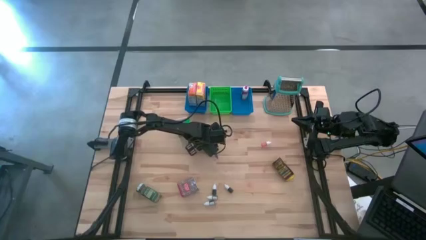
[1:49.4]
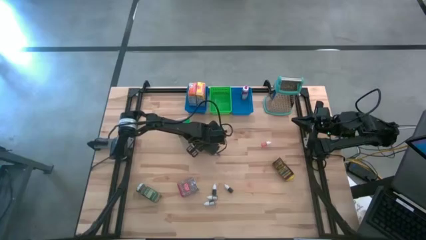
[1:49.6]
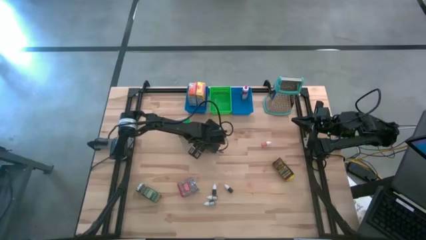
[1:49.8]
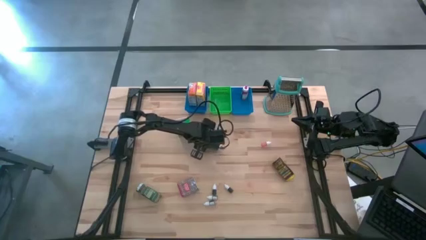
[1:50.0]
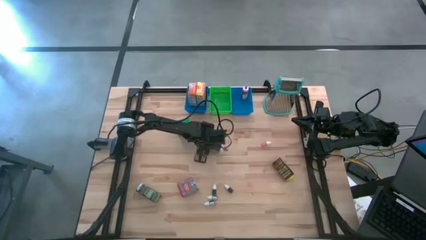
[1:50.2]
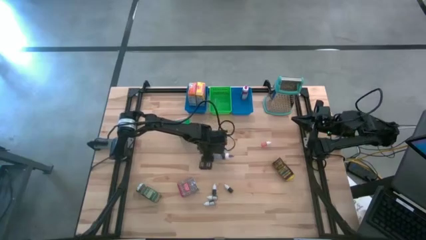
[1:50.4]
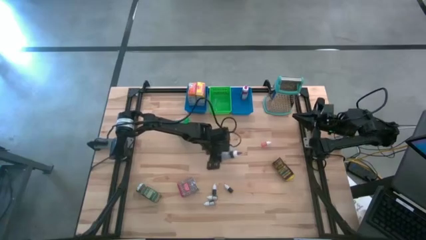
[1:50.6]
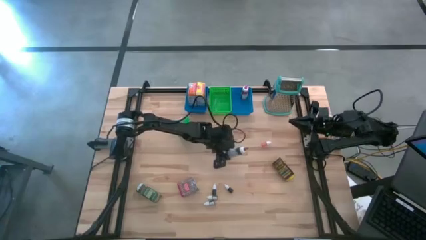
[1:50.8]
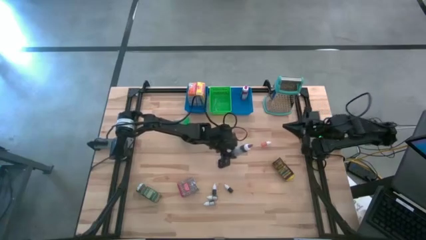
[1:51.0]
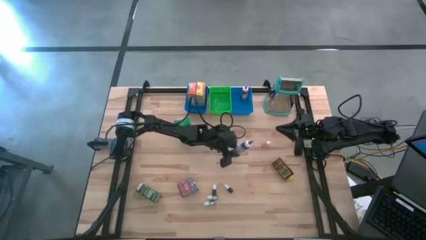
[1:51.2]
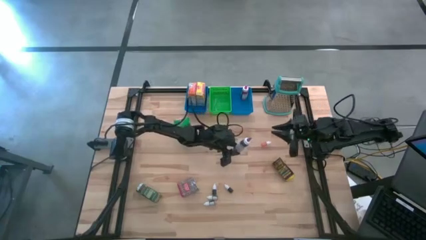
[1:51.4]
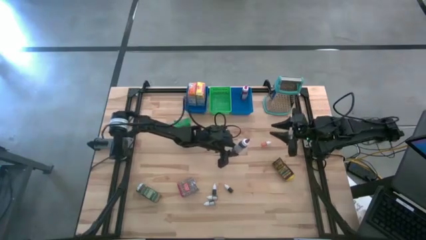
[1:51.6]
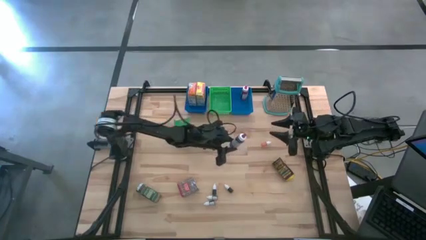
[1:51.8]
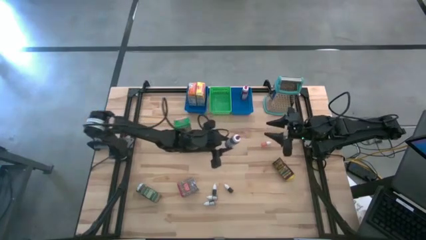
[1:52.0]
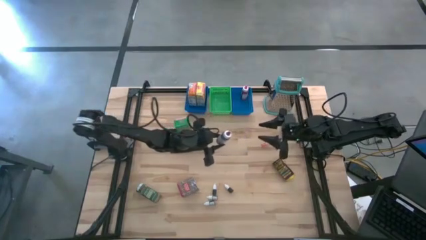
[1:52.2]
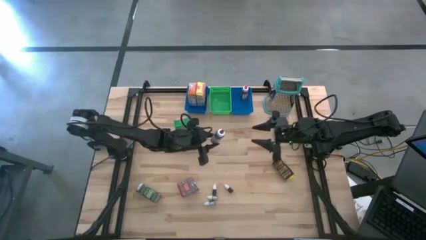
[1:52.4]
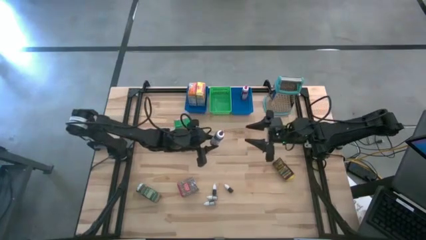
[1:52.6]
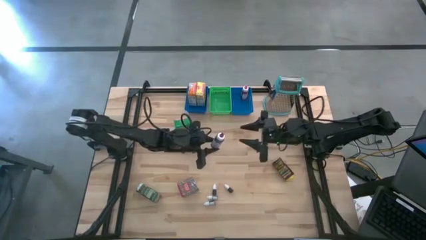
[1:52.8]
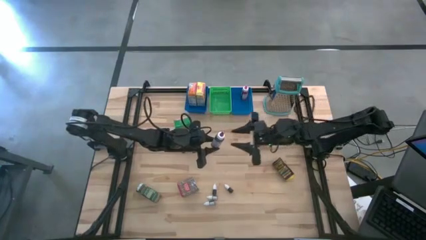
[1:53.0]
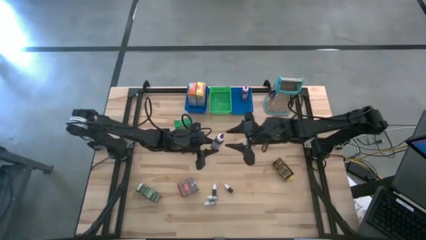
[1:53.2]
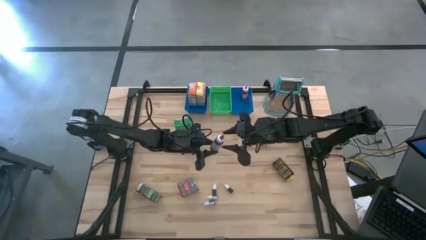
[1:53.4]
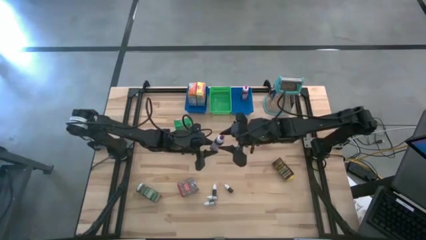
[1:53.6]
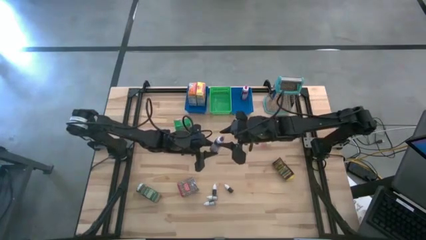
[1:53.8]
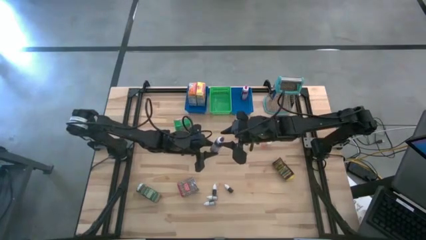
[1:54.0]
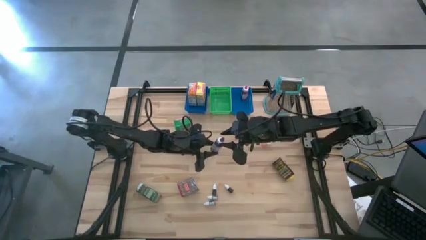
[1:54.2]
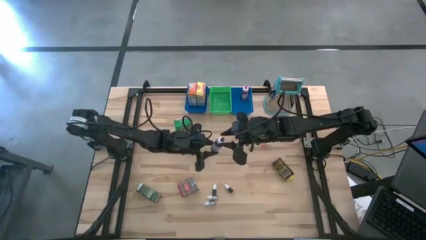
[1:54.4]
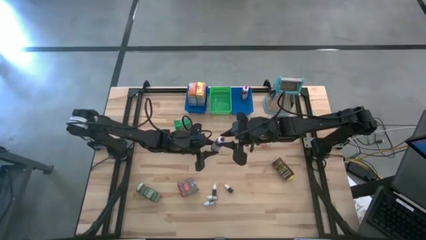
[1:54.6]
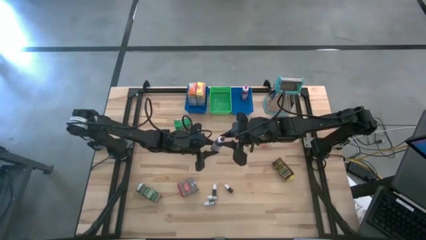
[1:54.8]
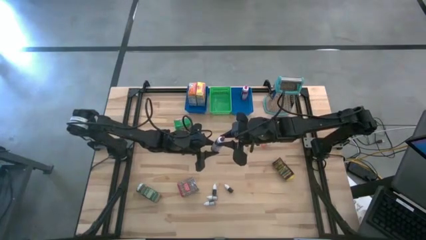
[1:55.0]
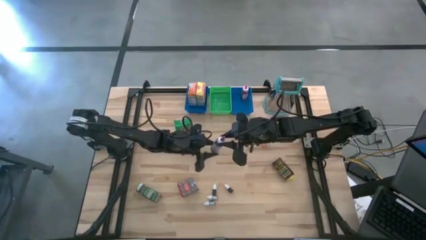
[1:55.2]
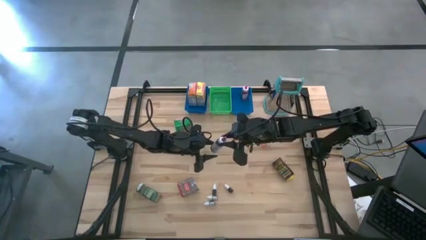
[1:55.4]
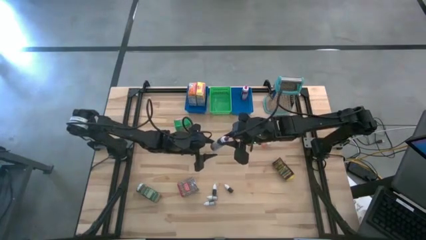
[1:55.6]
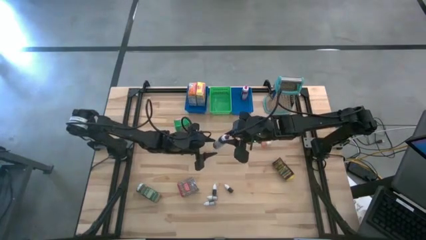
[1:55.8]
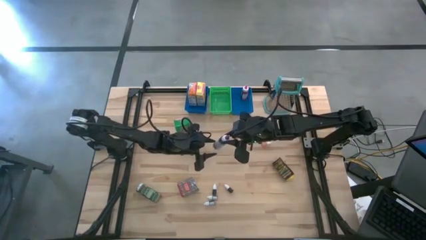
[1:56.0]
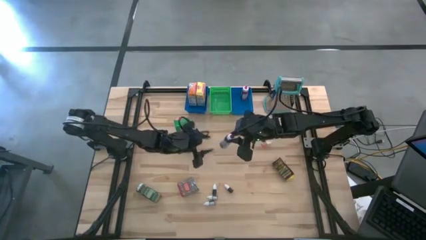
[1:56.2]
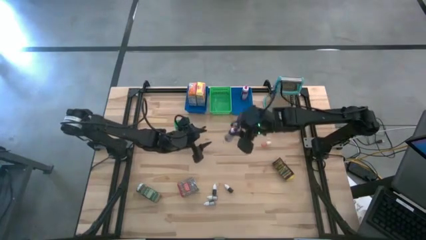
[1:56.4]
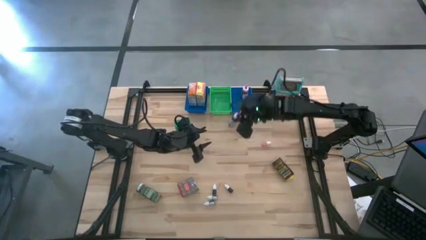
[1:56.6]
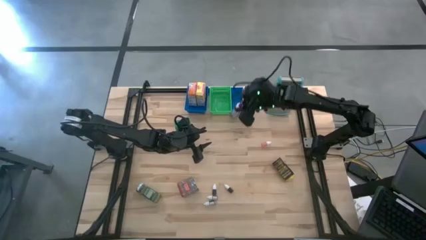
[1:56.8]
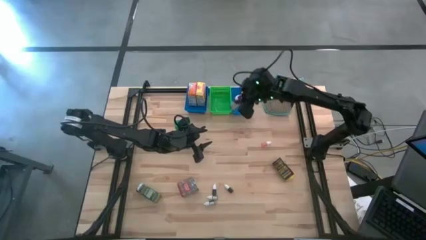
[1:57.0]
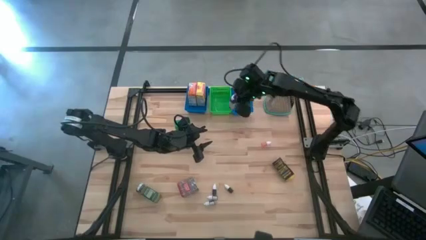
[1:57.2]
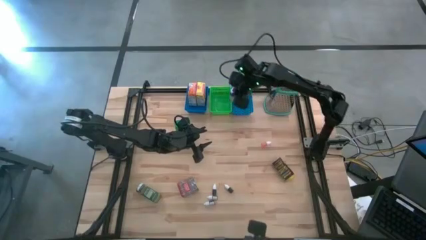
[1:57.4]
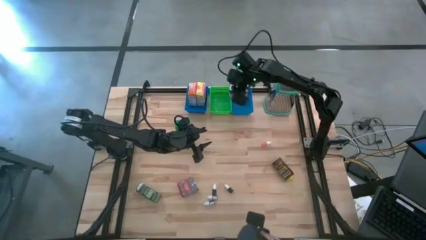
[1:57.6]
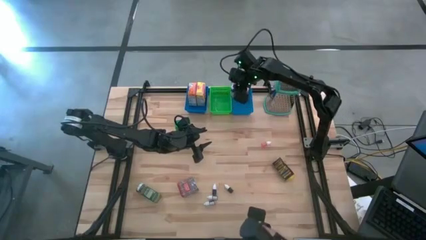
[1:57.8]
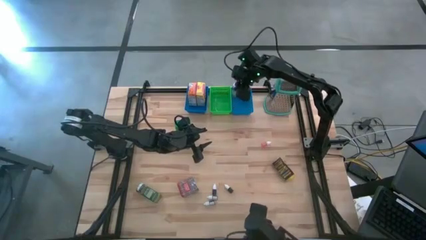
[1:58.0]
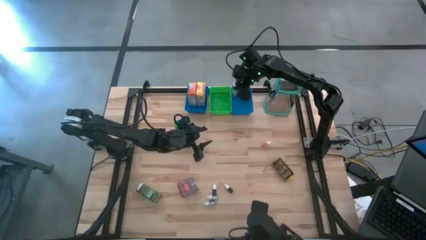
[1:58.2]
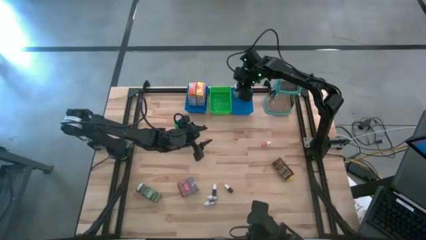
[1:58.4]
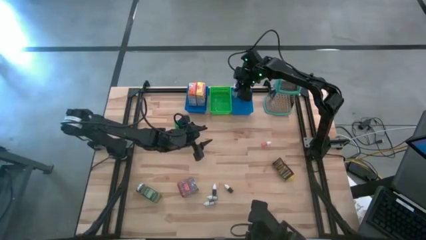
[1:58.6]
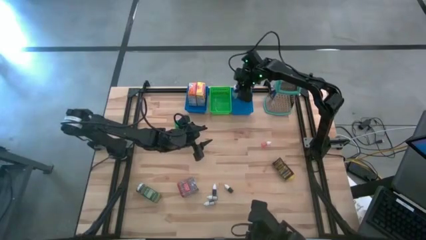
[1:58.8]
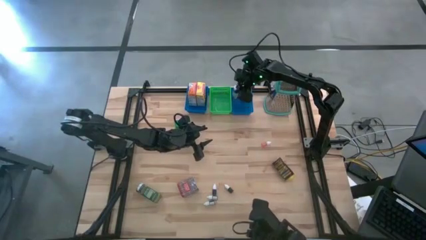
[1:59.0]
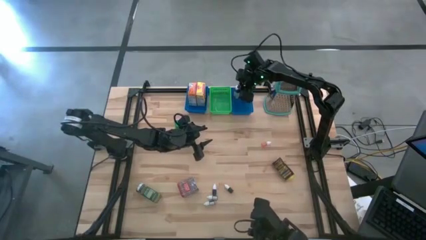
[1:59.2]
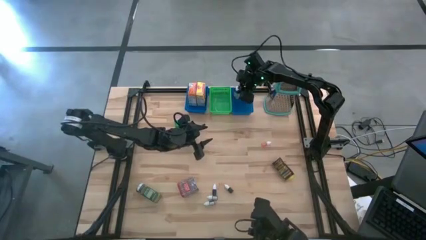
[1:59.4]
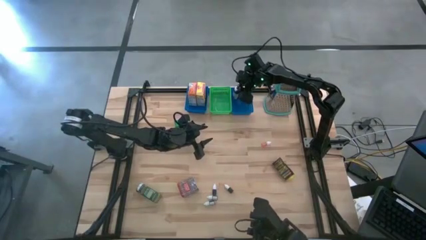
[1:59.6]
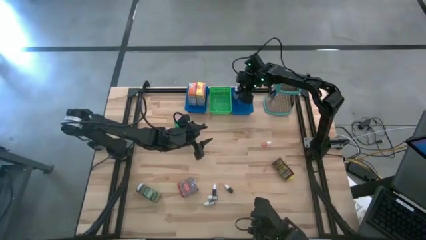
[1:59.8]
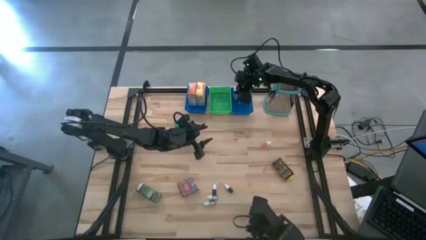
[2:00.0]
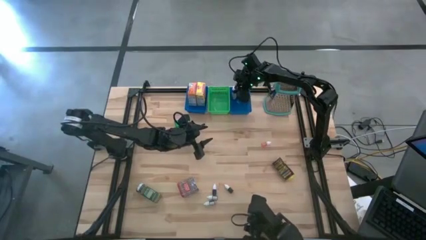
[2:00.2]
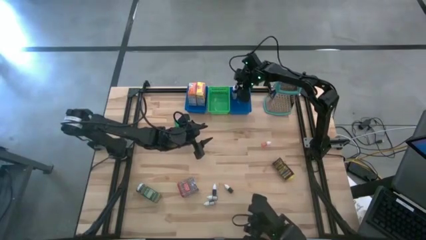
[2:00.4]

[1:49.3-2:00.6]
Task: Pick & Place Kitchen Items
Put the large purple food coloring into the right blue bin

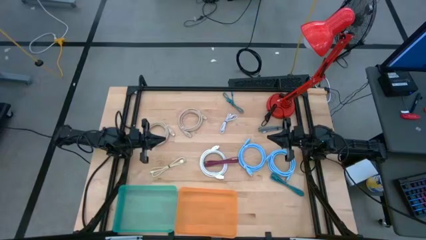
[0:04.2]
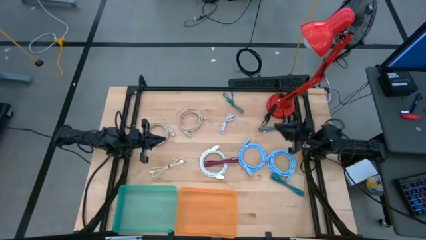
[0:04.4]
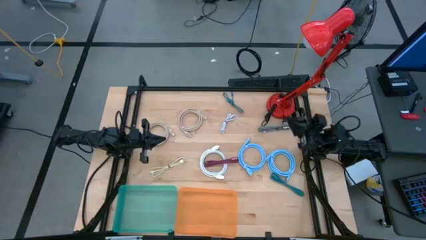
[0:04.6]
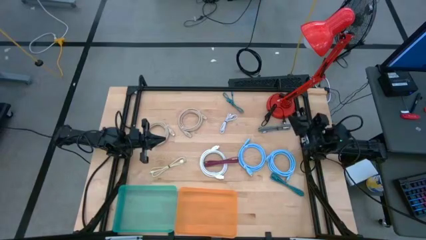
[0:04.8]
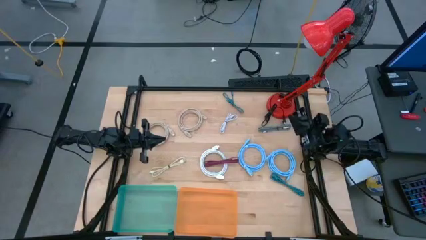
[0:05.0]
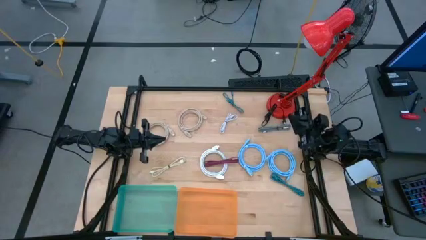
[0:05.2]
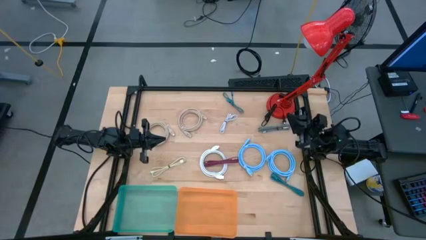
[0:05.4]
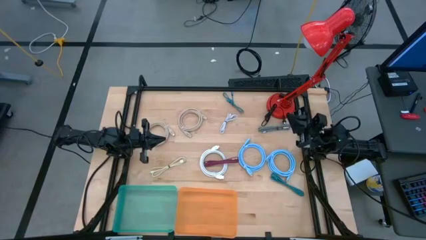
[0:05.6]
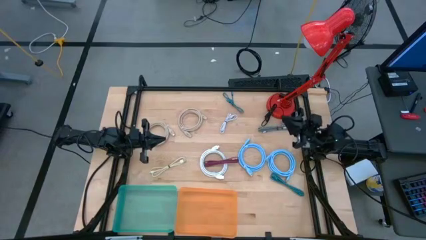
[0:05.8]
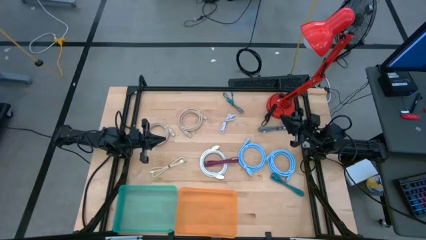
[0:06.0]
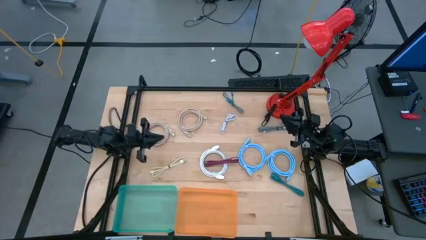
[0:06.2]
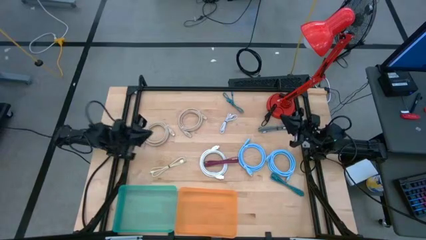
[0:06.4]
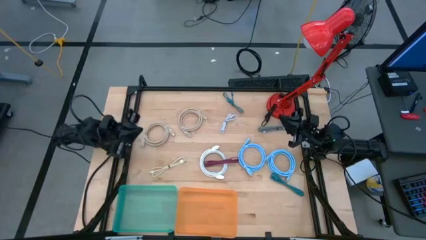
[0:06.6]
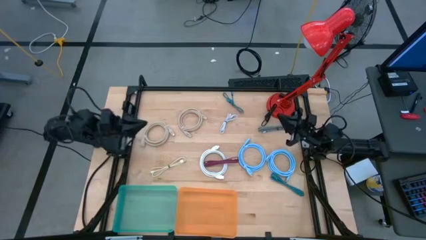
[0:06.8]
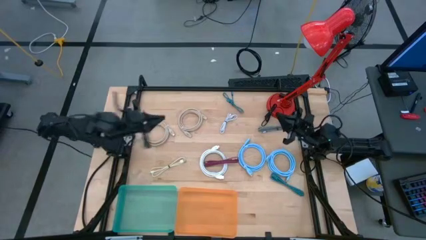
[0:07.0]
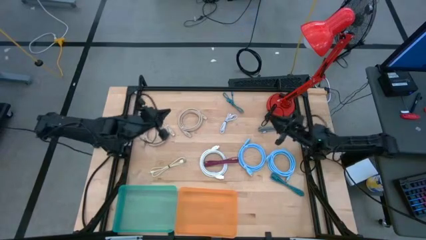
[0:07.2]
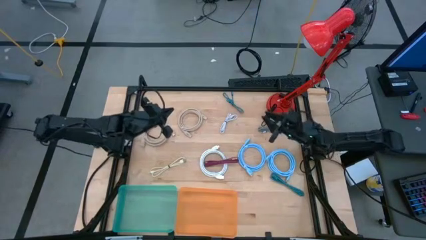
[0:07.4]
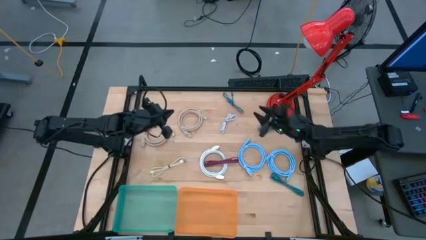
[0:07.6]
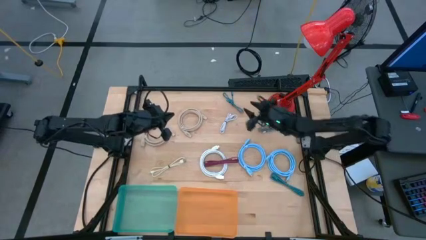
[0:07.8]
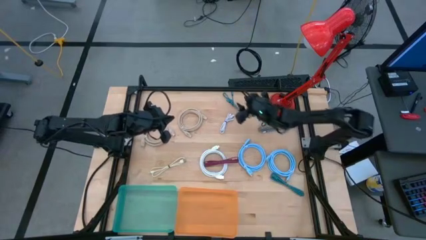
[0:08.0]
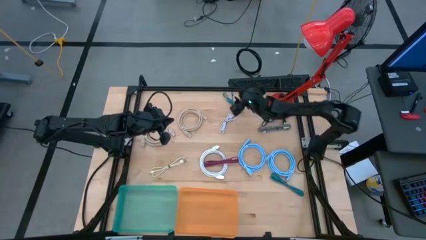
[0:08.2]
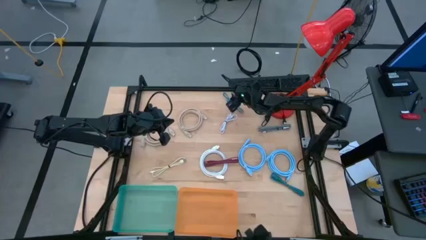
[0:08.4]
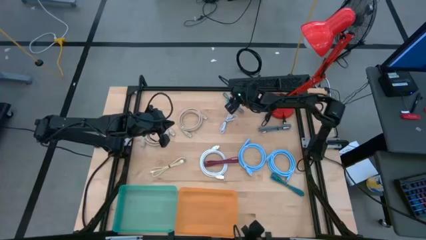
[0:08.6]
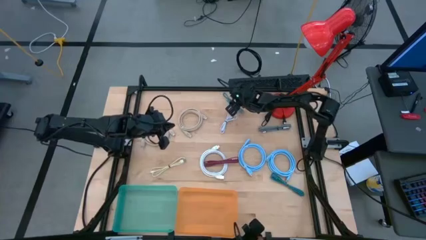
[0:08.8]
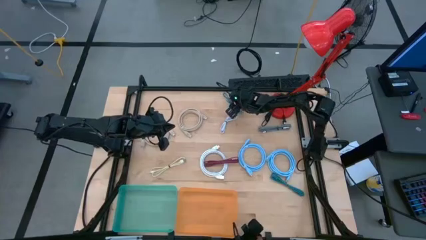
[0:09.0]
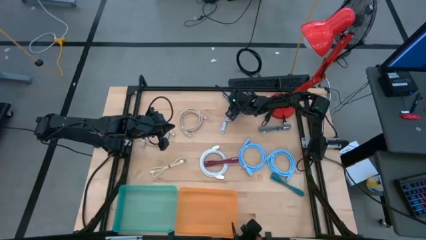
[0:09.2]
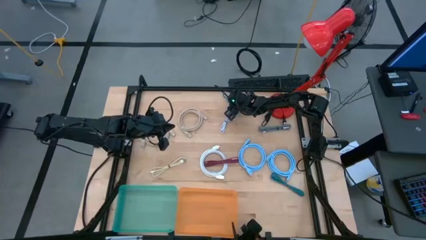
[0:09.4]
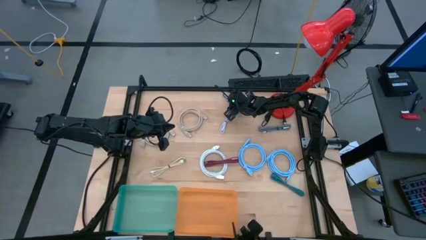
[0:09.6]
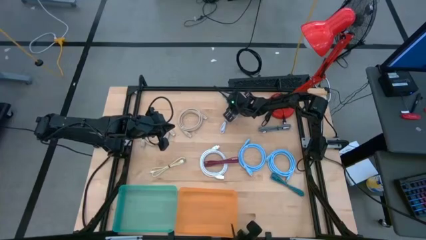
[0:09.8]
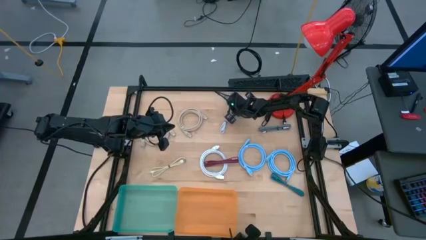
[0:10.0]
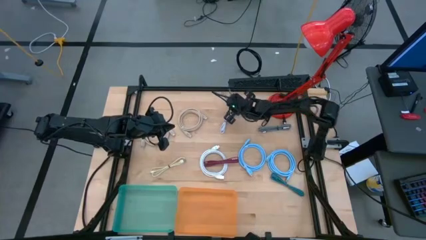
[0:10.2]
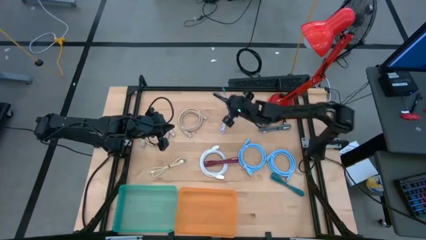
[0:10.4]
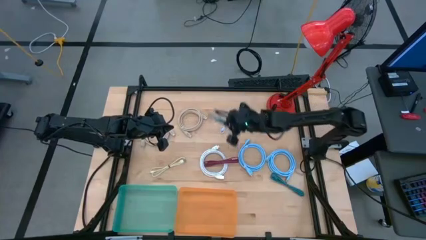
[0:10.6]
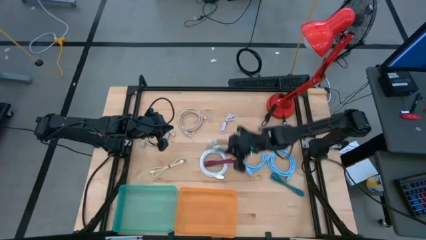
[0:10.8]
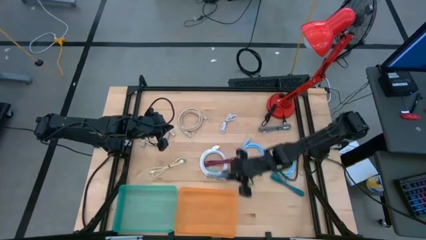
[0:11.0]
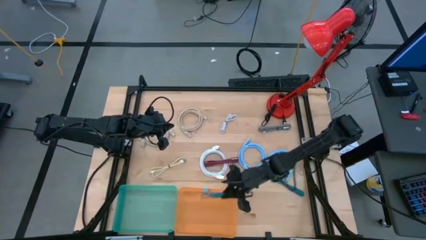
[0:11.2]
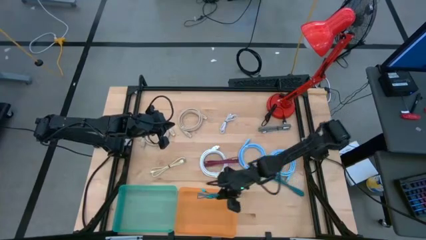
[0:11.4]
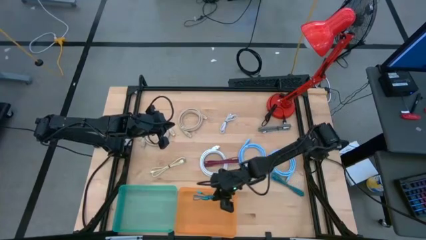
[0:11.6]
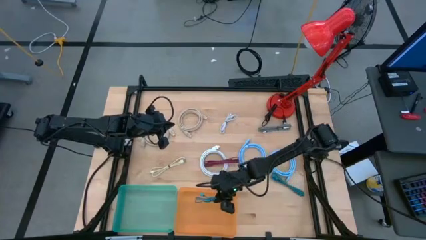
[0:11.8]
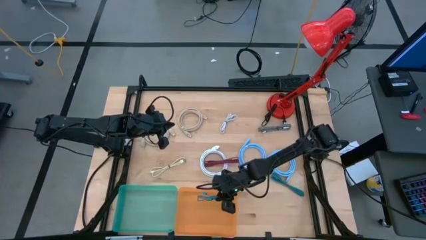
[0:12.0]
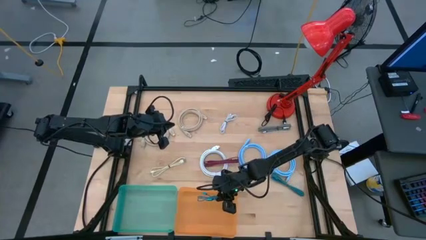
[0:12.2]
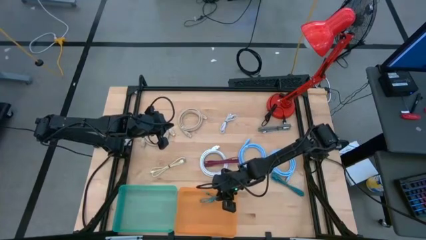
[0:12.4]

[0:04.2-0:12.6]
Task: Pick & Place USB Port
Put the left blue charger cable into the orange bin
